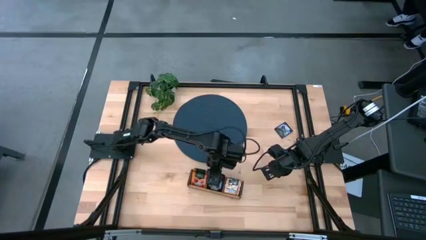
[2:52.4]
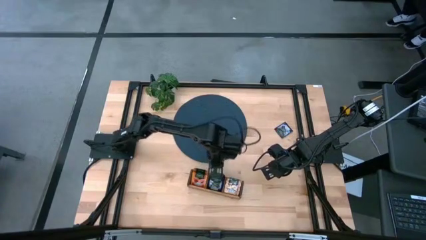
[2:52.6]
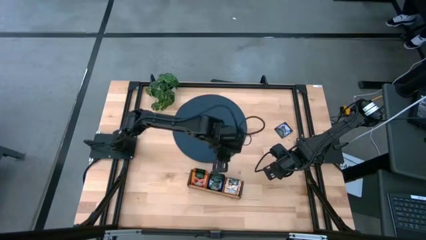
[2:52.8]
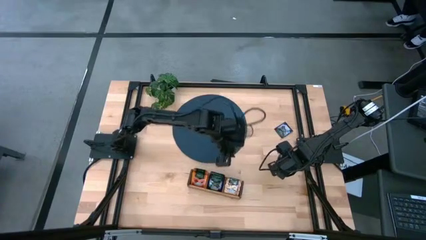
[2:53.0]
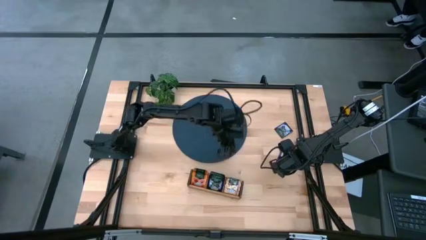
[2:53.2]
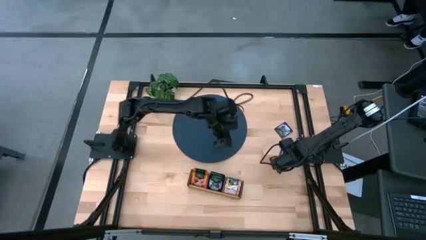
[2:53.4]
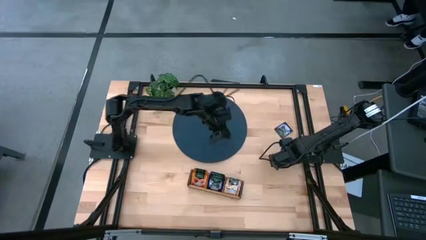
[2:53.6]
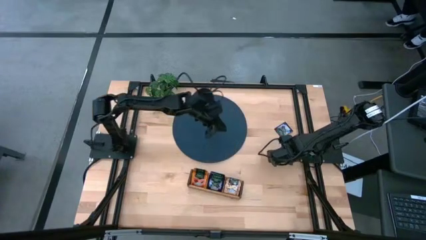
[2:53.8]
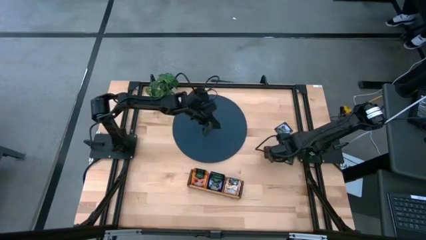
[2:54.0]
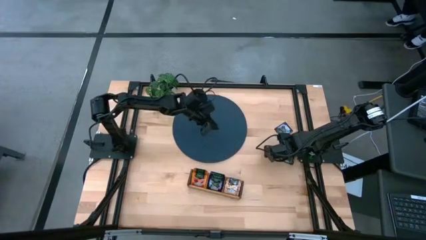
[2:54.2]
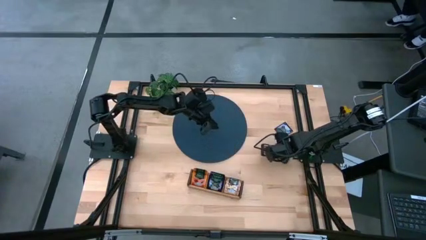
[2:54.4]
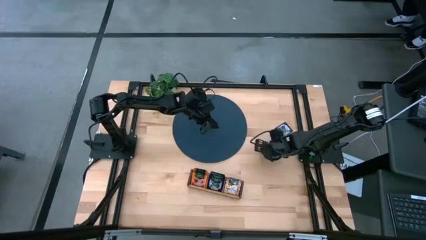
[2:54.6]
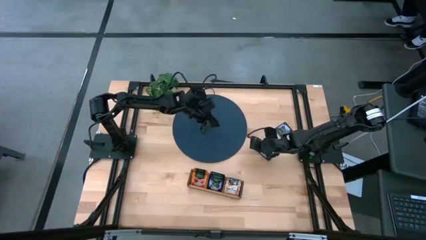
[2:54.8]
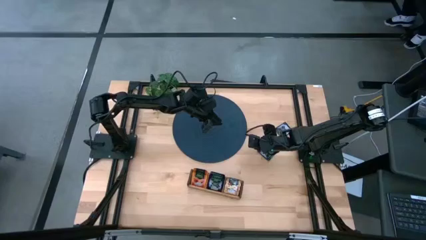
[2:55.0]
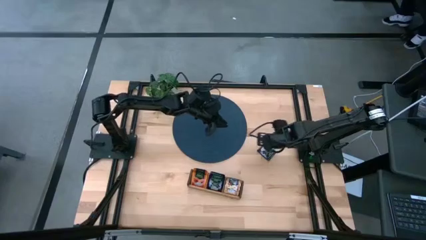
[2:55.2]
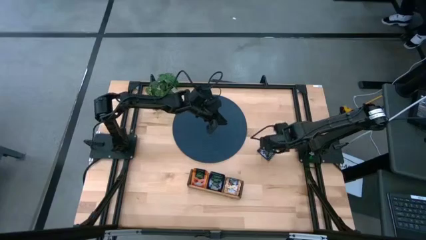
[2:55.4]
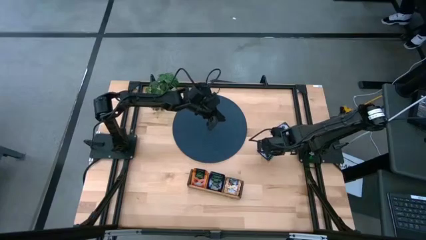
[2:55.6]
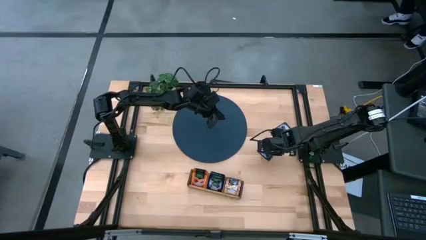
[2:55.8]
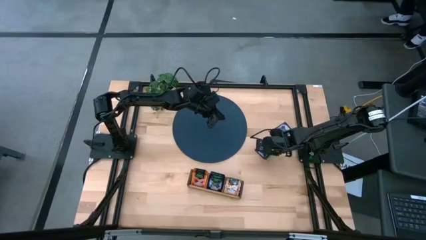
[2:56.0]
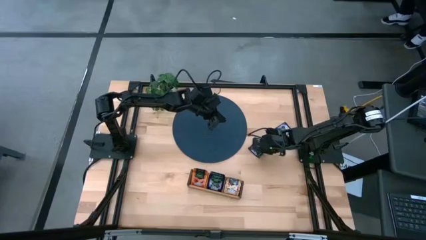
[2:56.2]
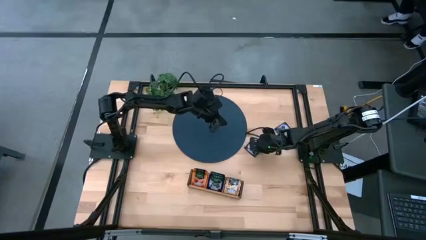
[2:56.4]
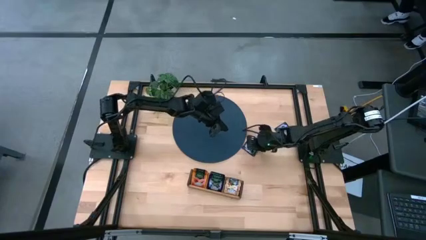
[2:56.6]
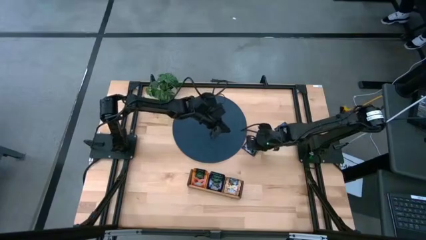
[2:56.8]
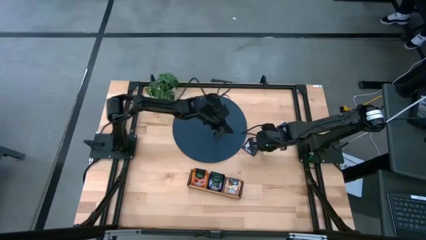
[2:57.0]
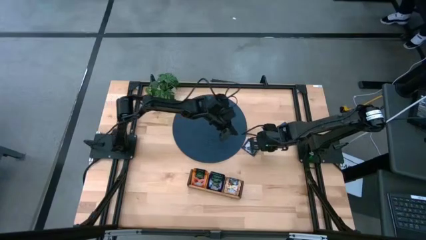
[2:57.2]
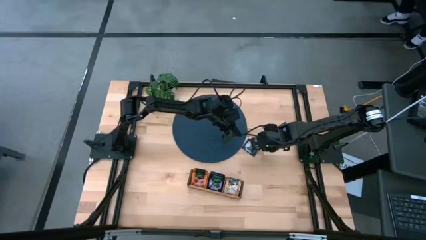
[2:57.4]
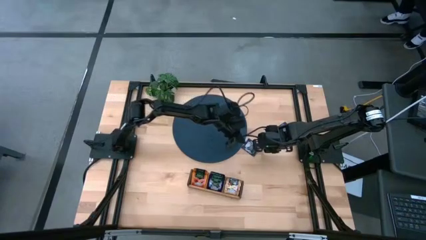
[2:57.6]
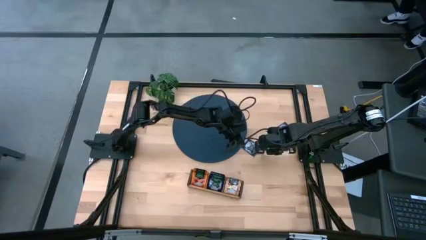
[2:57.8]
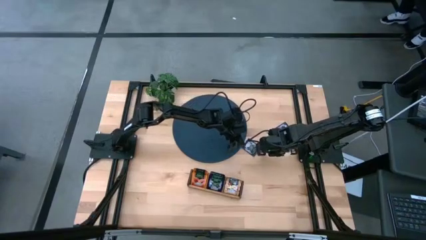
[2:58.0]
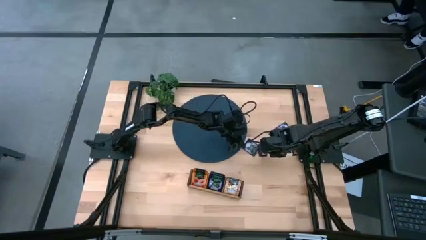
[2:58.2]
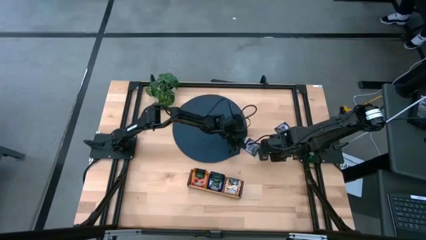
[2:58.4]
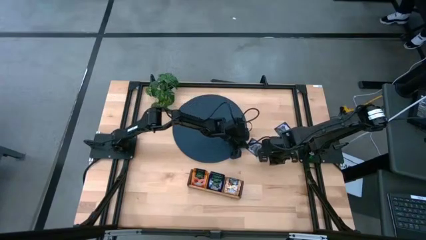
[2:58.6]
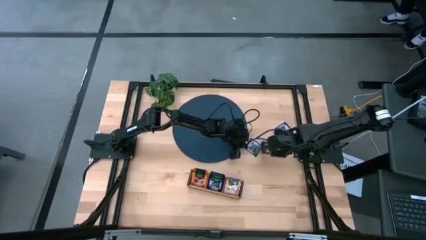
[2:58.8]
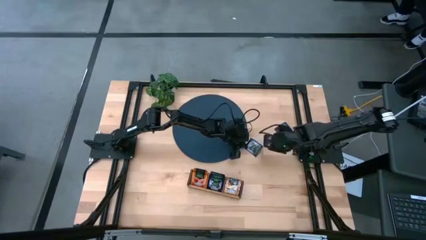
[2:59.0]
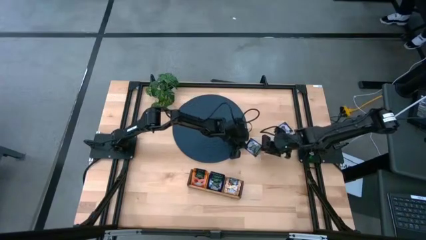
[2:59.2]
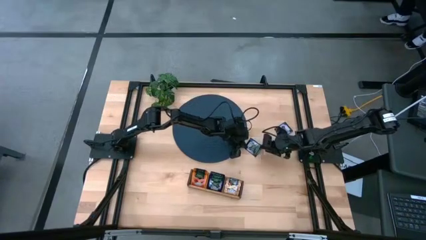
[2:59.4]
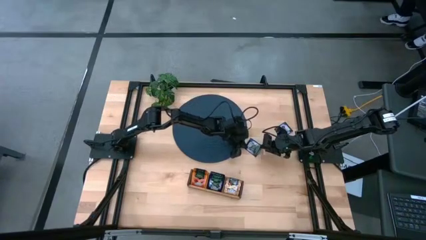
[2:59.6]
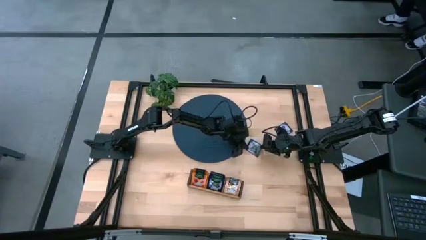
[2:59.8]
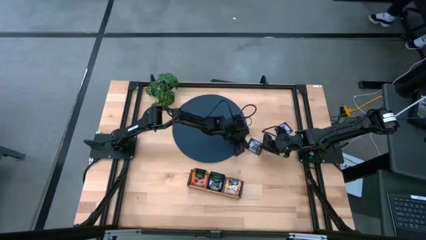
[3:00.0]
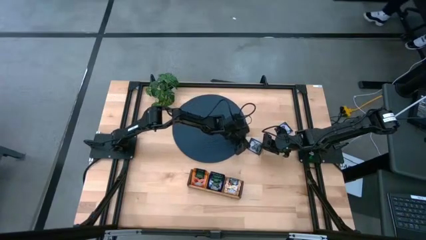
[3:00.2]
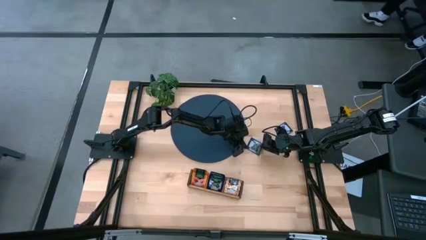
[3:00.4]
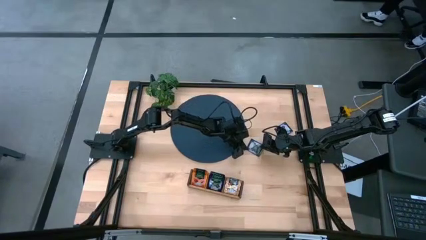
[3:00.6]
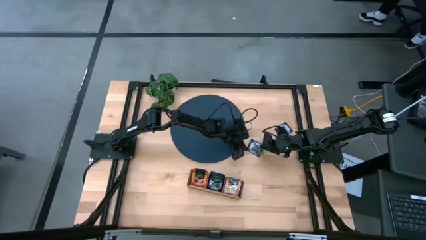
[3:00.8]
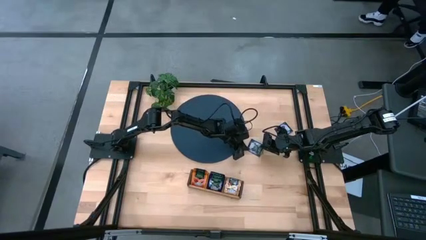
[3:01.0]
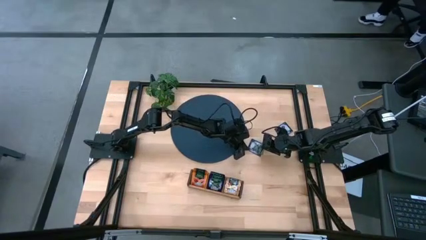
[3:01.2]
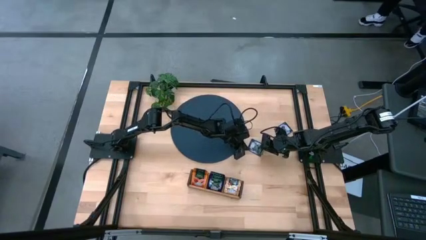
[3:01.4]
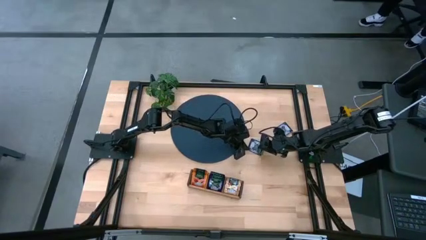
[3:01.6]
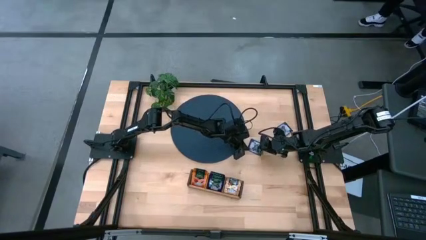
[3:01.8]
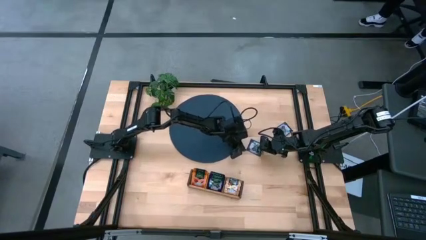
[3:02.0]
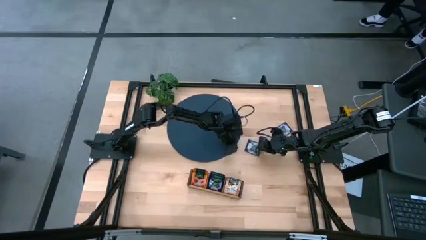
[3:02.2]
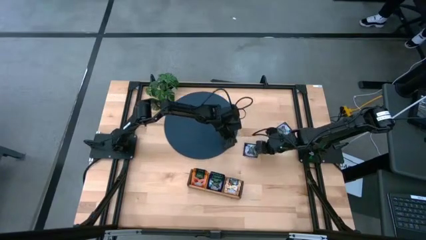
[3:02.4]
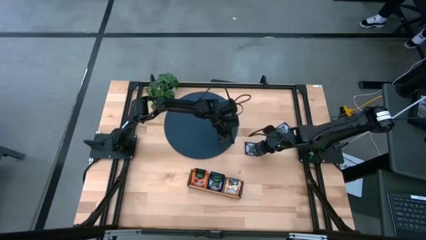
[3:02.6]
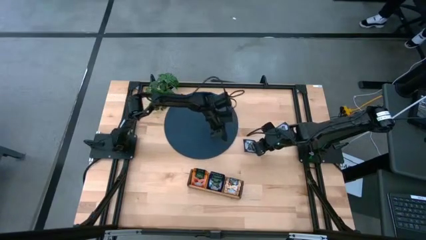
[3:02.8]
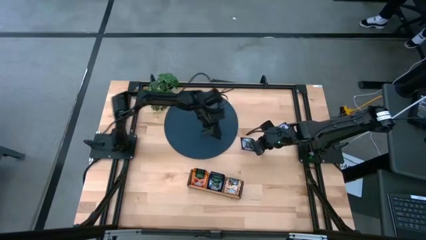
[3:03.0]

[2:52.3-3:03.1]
Task: Pick & Place Tea
Put the violet tea bag into the middle section of the wooden organizer

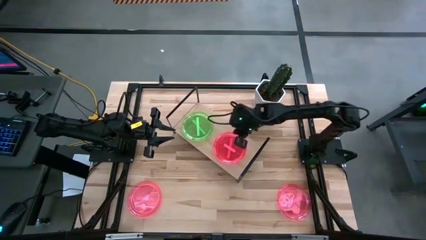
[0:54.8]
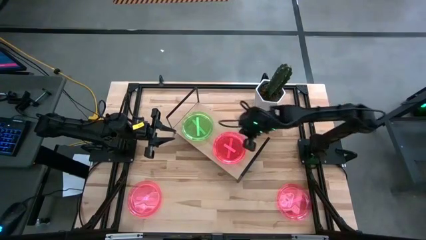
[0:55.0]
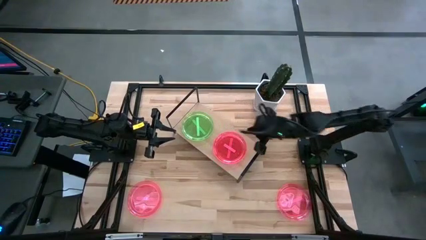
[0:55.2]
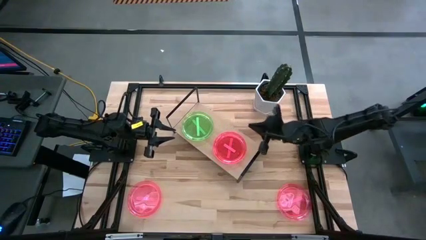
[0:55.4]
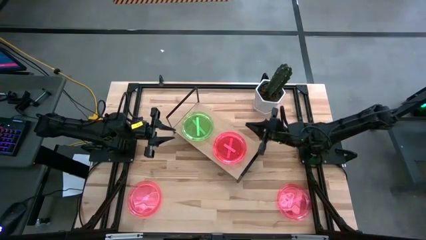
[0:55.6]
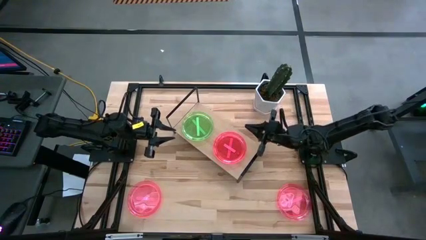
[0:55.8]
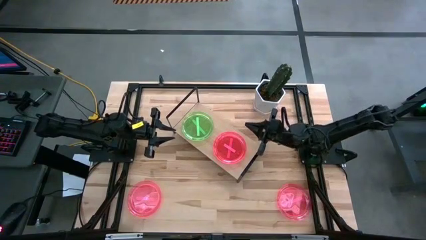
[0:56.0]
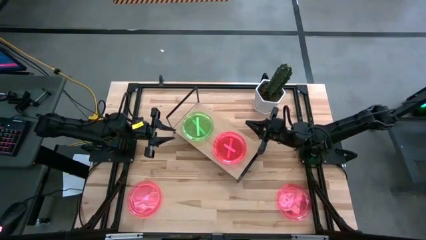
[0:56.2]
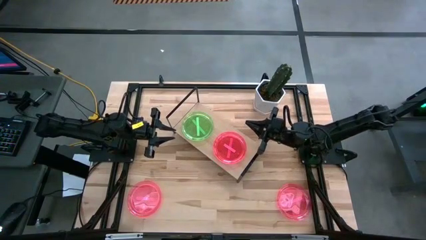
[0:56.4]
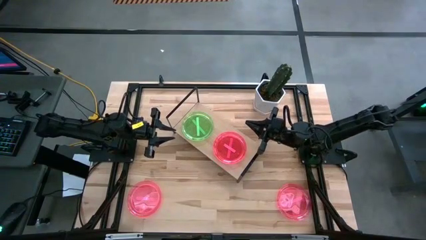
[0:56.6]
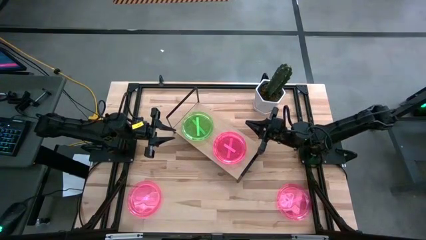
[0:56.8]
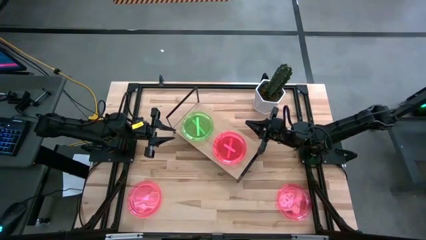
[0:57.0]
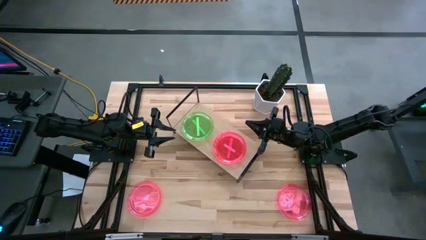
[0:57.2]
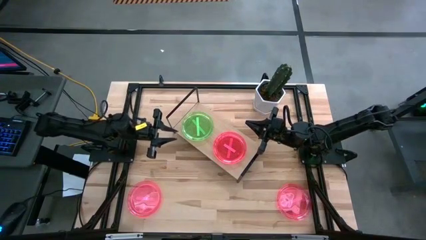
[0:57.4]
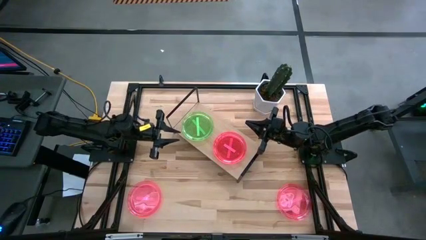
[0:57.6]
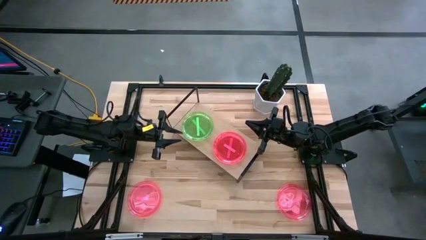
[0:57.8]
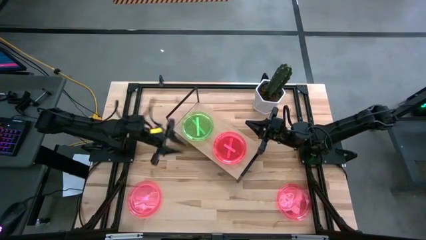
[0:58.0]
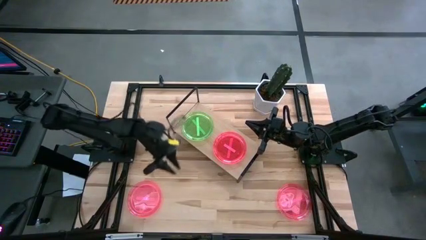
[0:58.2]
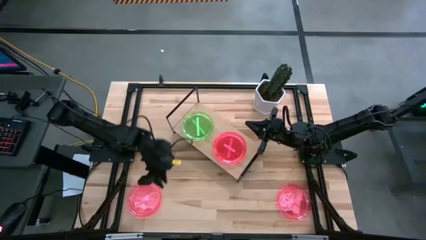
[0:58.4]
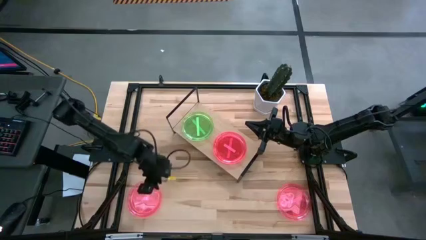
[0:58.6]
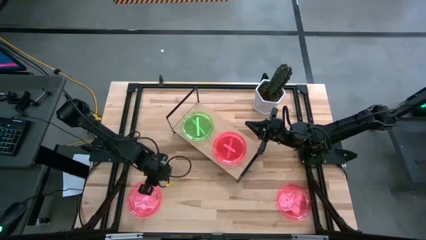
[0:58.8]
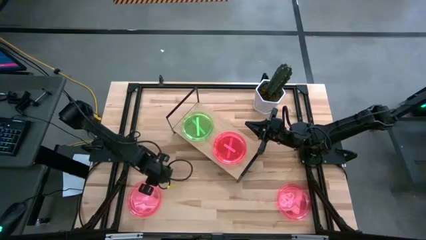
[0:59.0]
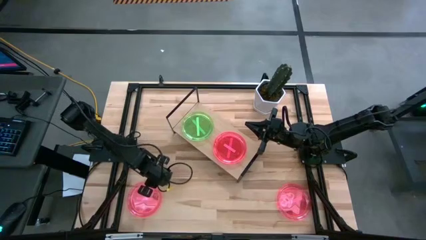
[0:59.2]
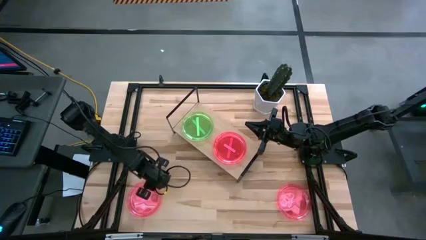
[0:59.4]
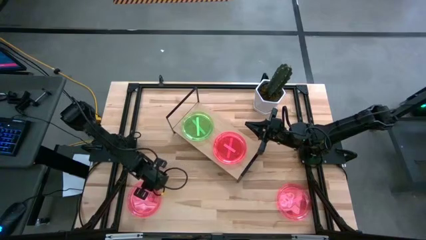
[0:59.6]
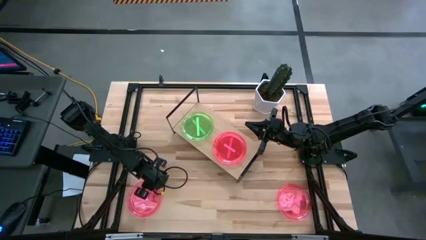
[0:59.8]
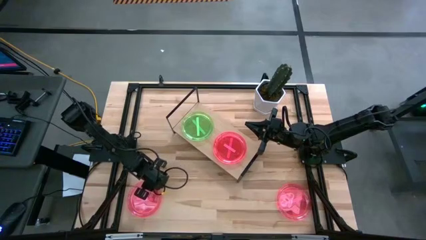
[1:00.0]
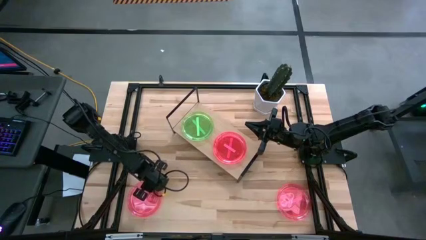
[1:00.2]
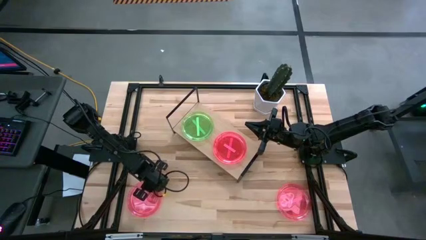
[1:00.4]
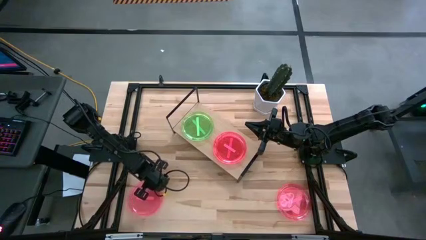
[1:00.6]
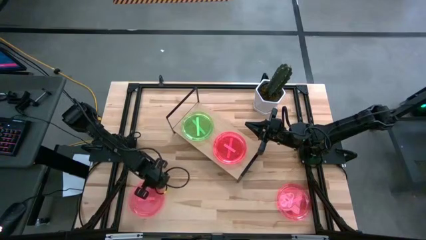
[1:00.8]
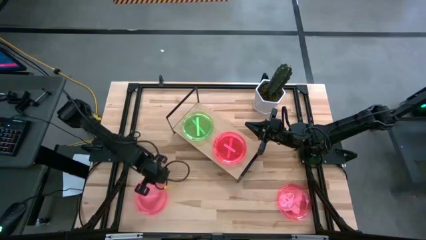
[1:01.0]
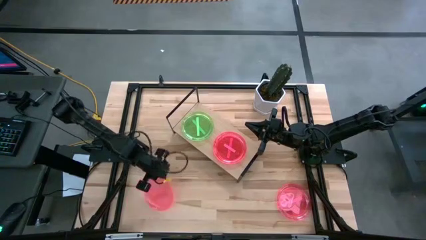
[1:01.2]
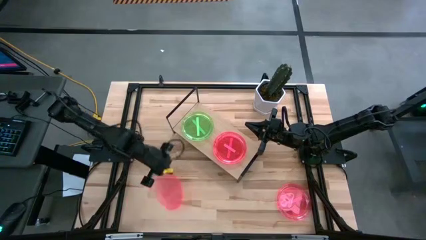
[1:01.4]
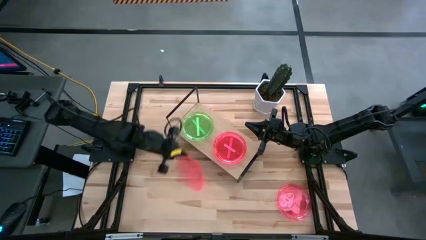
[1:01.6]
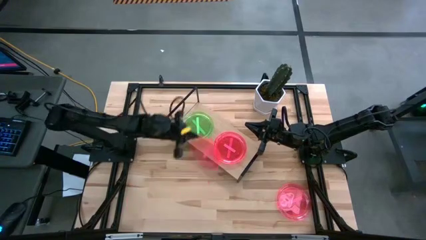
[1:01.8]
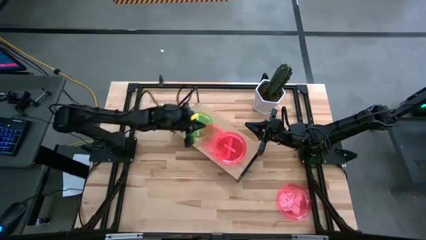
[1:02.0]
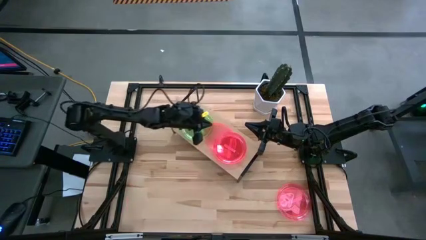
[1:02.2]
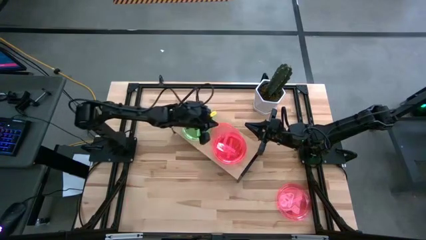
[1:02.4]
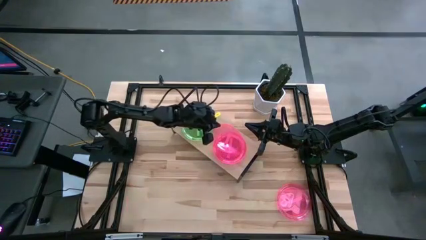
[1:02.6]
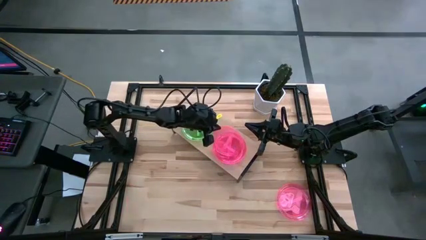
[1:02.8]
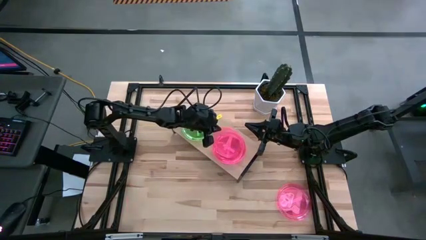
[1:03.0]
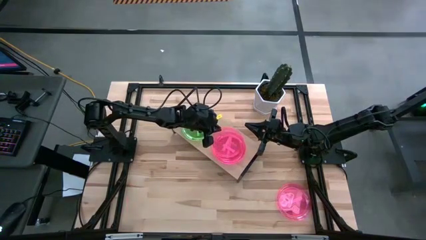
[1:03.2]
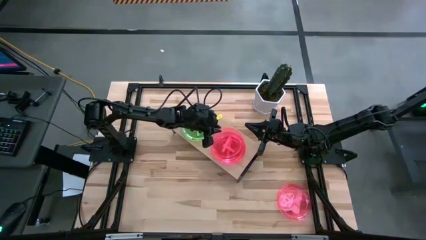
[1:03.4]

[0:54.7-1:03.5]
Task: Place and stack plates onto a shelf
Stack the pink plate on top of the other pink plate on the shelf
